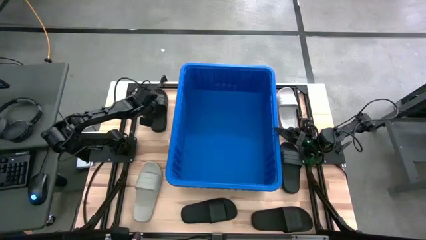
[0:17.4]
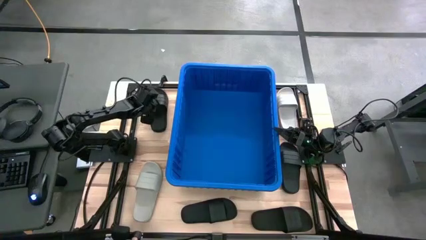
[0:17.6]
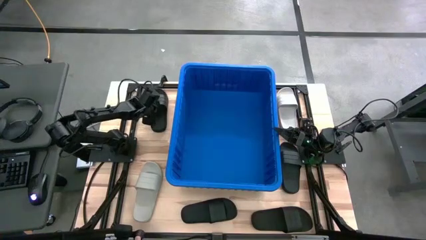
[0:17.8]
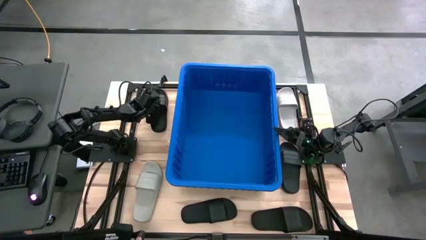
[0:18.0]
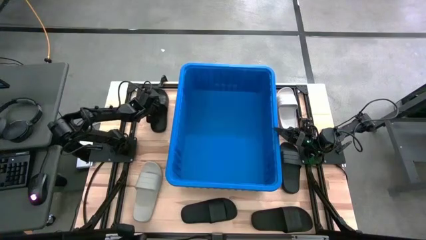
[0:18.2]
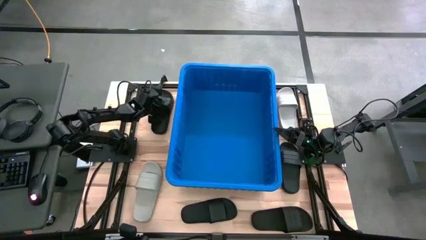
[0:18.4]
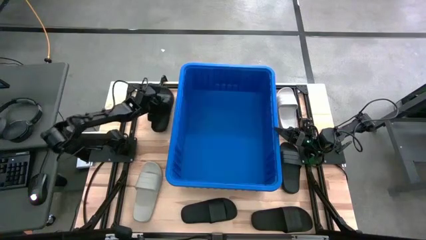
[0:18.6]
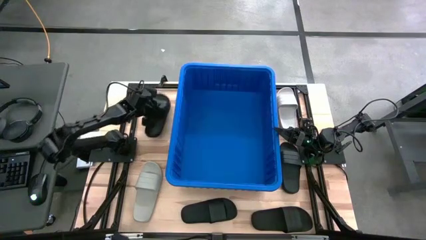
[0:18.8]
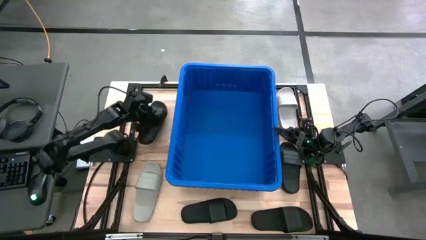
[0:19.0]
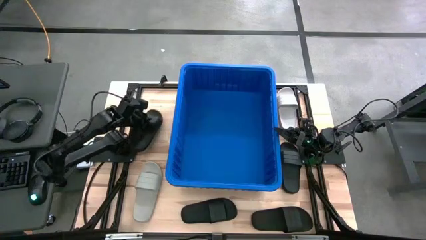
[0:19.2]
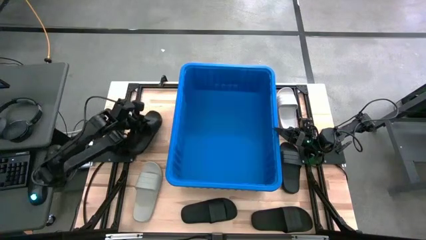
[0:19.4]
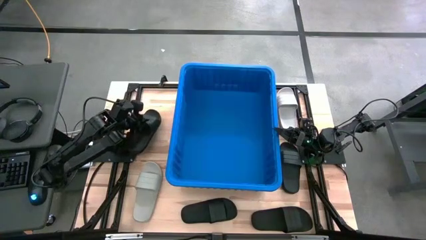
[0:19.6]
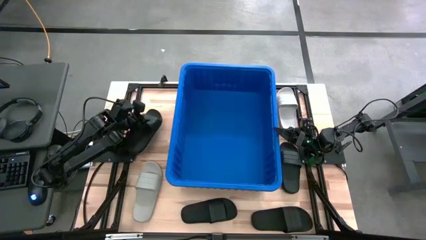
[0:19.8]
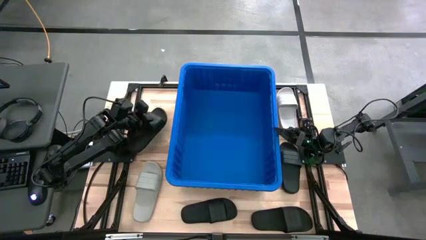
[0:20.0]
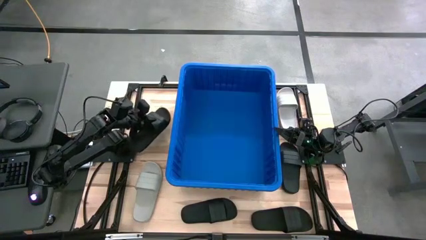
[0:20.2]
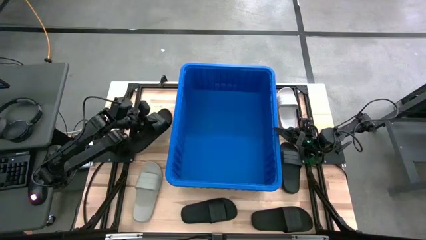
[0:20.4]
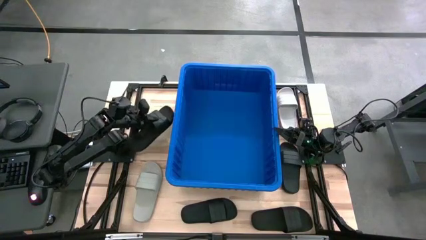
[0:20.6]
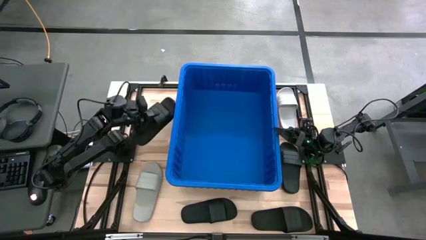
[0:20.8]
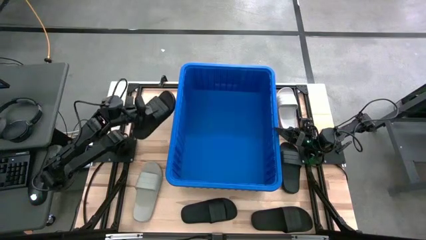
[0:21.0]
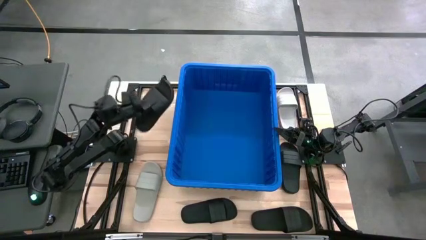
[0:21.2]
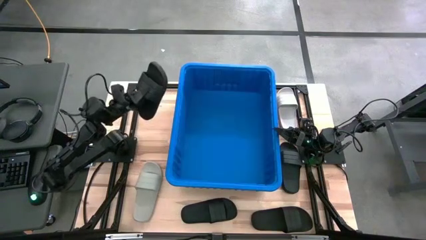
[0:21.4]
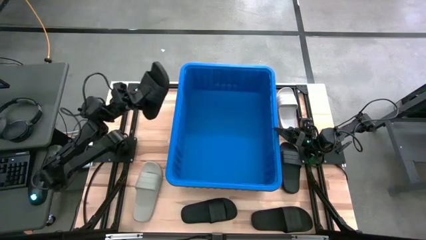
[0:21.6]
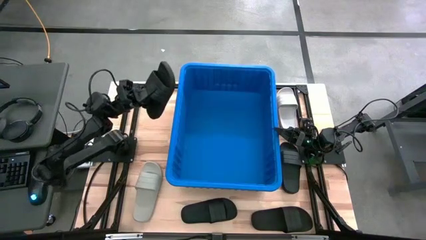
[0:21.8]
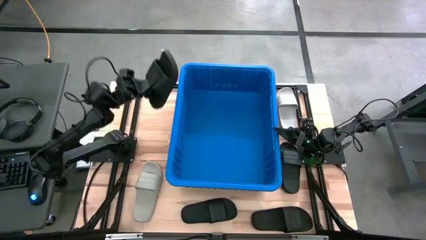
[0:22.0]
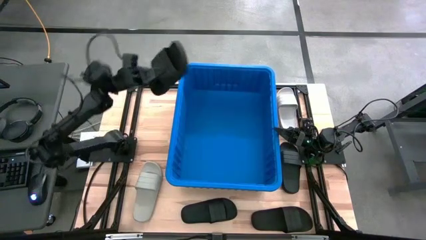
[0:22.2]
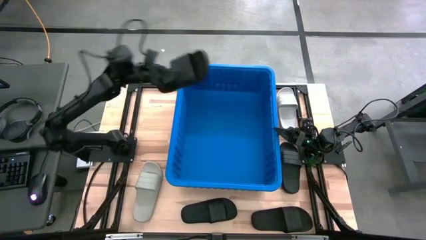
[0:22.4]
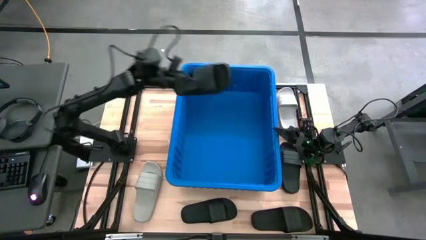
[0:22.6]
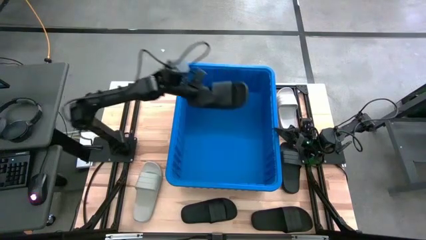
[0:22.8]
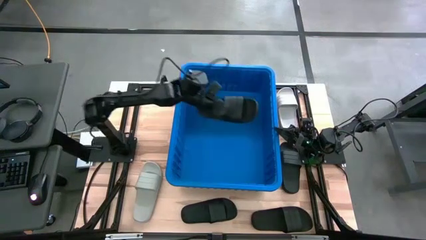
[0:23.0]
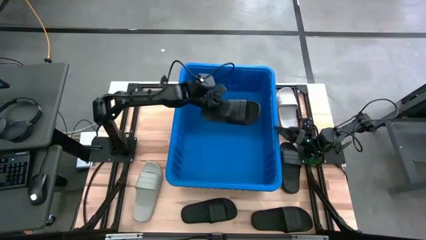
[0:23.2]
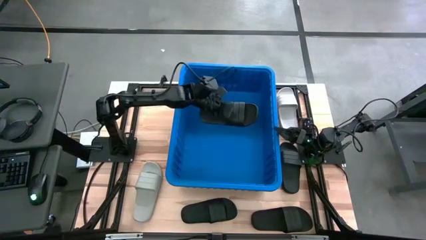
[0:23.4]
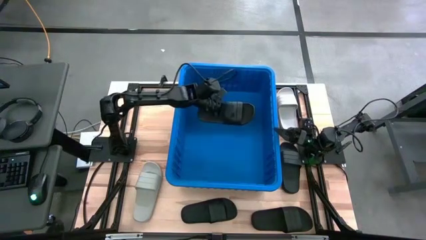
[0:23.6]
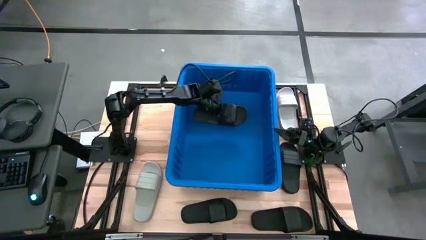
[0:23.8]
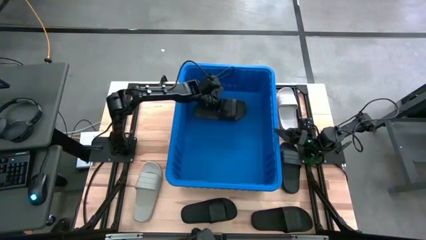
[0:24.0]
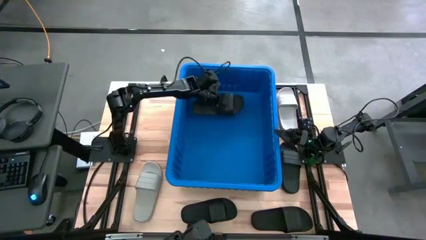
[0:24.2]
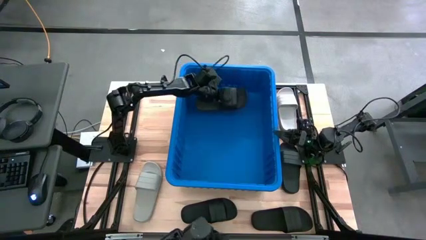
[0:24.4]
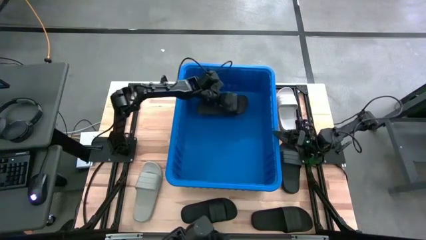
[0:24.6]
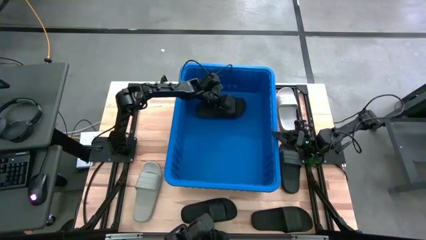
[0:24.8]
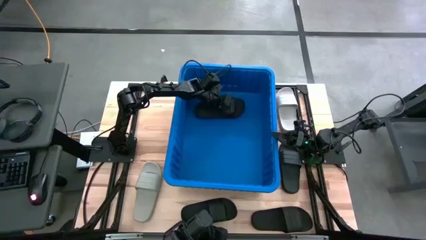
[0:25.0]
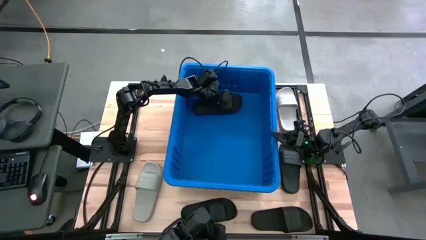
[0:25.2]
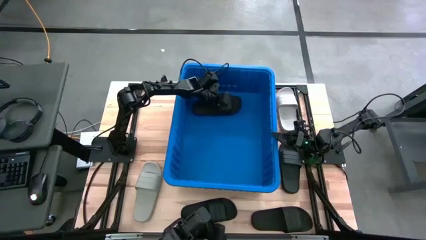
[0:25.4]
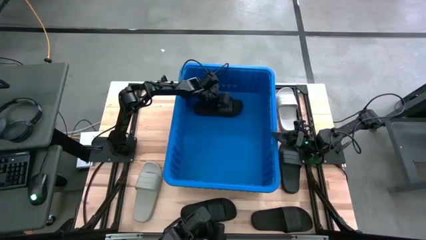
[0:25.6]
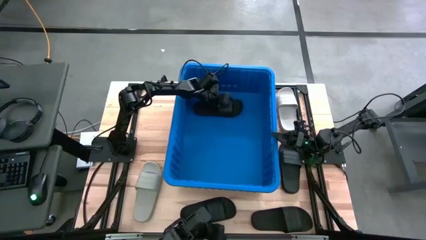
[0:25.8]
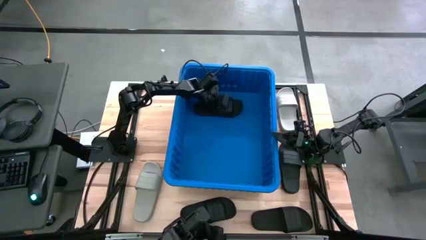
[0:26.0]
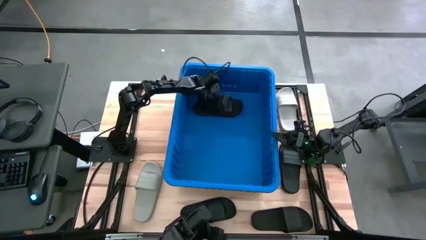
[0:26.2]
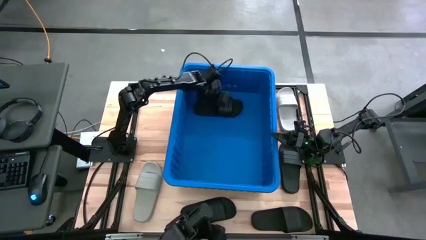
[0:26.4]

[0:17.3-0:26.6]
Task: Pick and place slides into bin
Put the black slide into the blue container

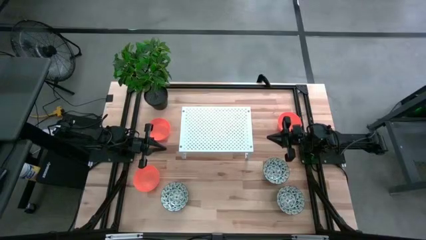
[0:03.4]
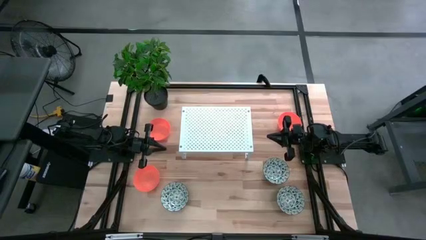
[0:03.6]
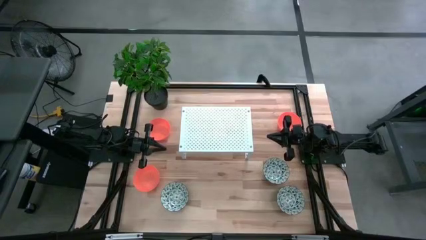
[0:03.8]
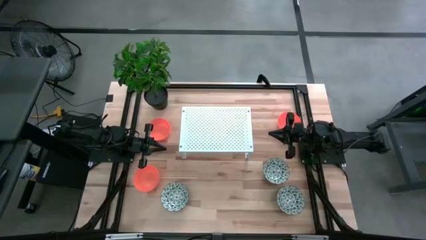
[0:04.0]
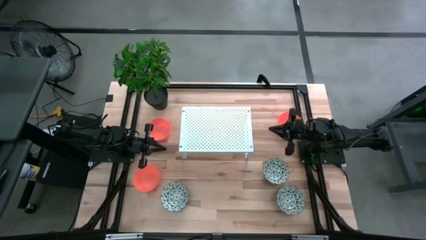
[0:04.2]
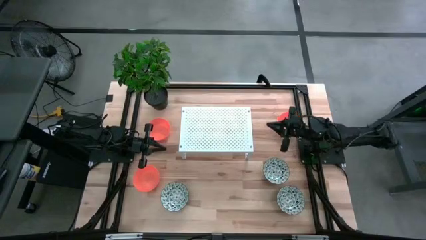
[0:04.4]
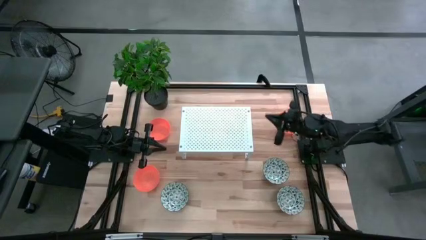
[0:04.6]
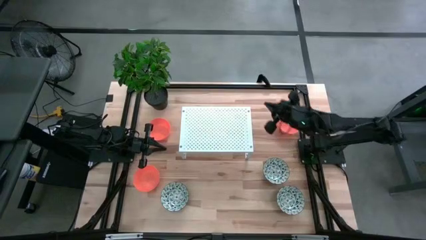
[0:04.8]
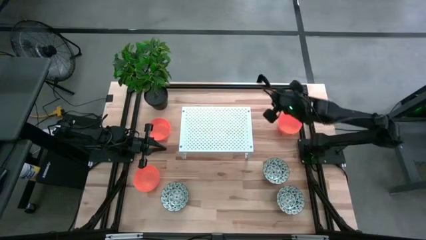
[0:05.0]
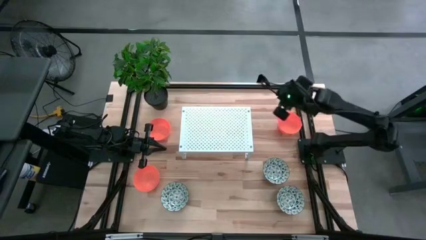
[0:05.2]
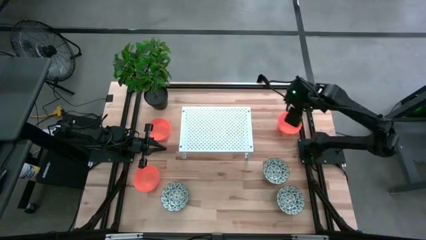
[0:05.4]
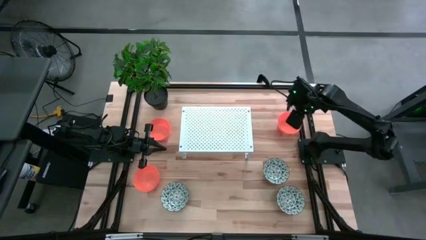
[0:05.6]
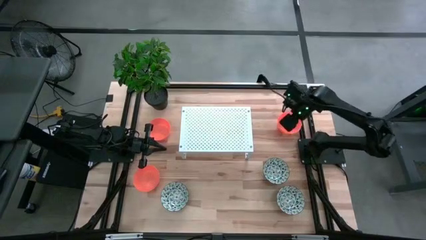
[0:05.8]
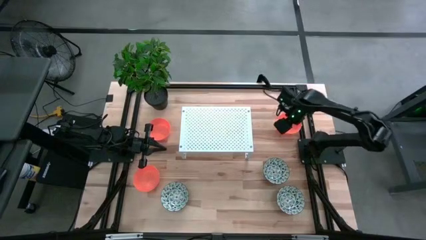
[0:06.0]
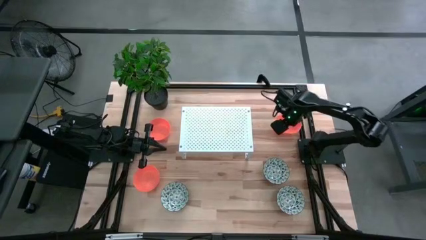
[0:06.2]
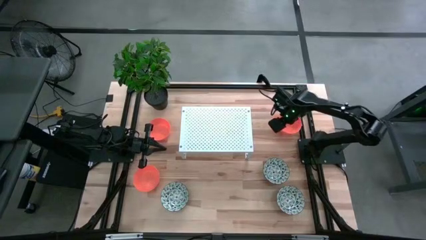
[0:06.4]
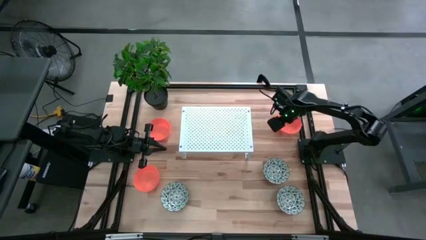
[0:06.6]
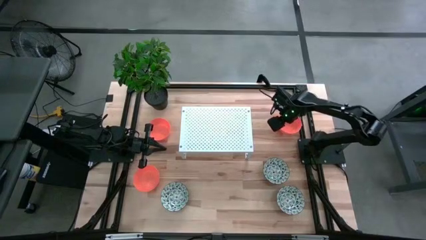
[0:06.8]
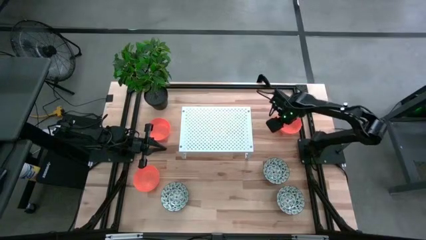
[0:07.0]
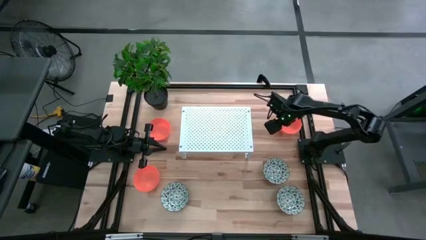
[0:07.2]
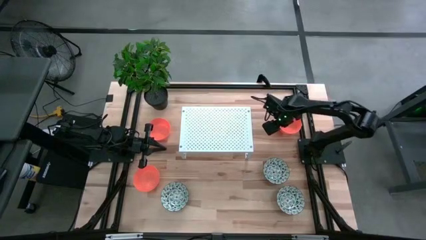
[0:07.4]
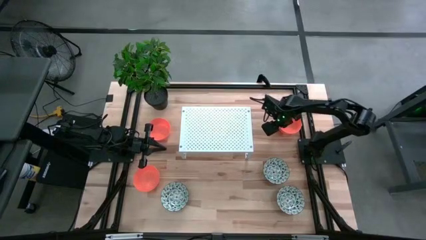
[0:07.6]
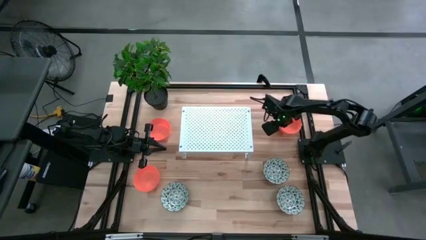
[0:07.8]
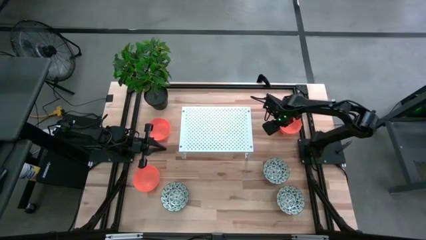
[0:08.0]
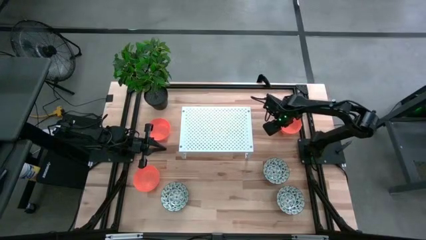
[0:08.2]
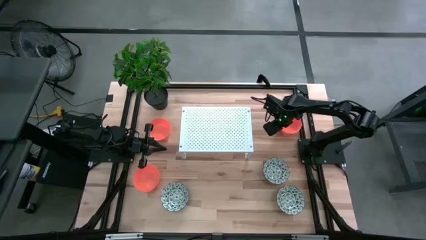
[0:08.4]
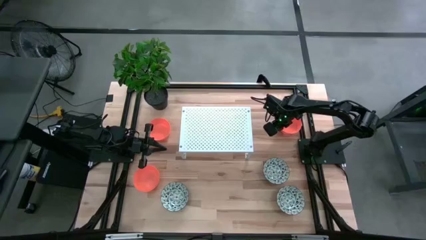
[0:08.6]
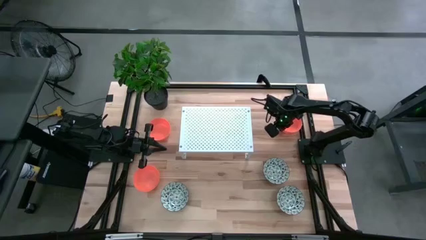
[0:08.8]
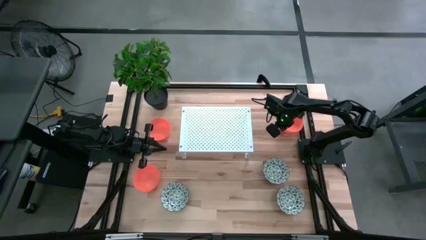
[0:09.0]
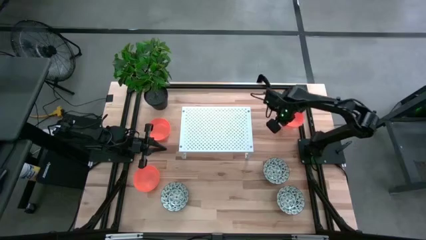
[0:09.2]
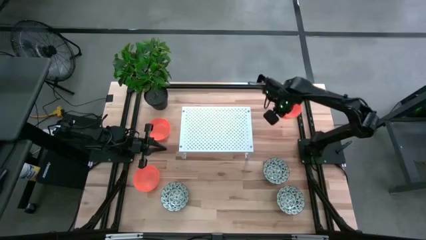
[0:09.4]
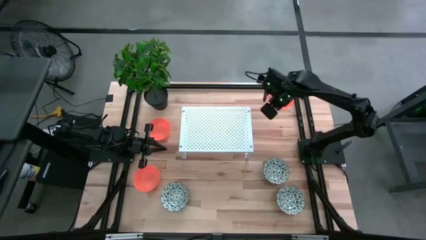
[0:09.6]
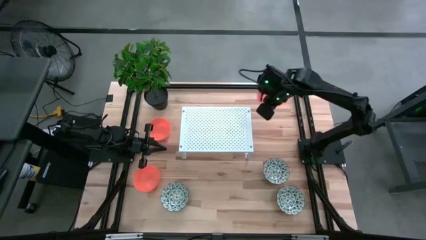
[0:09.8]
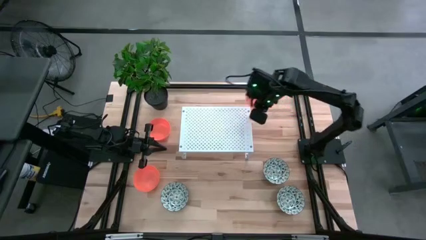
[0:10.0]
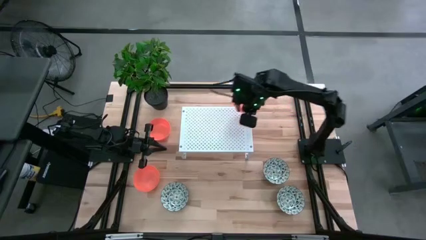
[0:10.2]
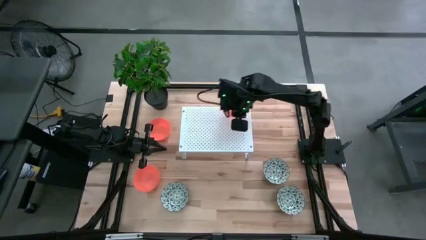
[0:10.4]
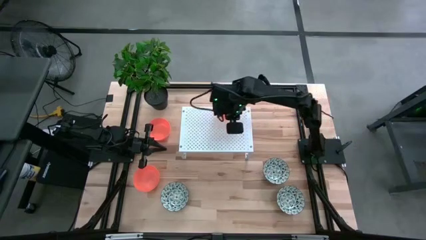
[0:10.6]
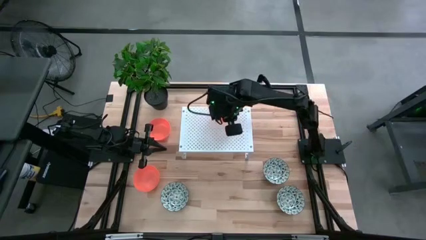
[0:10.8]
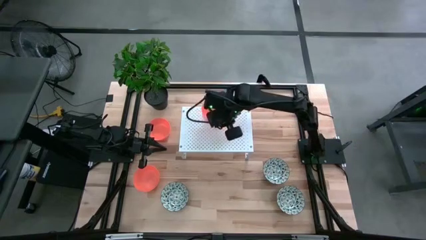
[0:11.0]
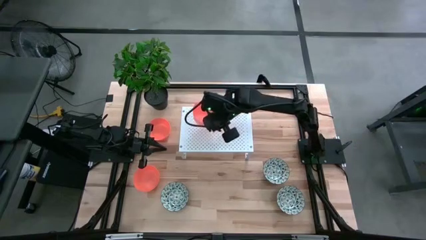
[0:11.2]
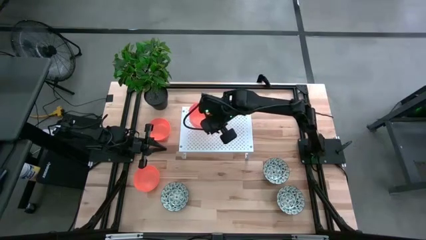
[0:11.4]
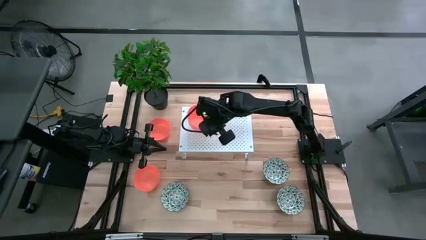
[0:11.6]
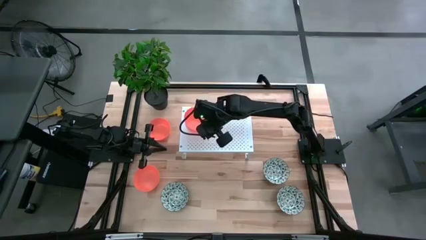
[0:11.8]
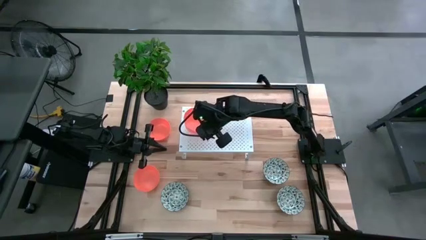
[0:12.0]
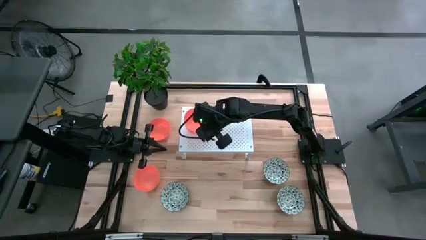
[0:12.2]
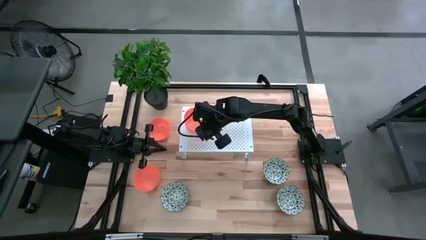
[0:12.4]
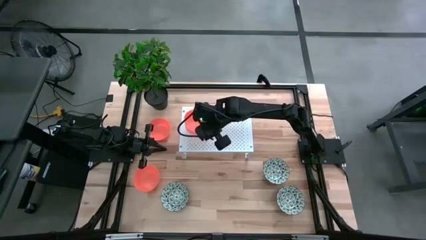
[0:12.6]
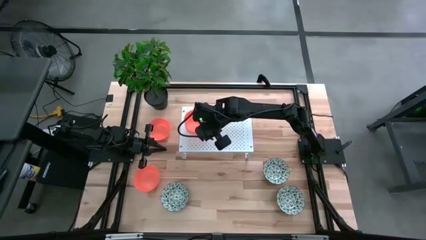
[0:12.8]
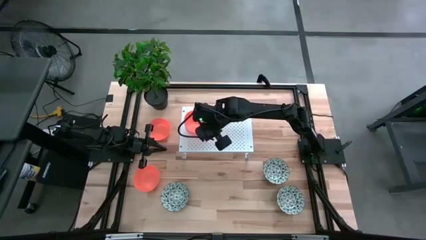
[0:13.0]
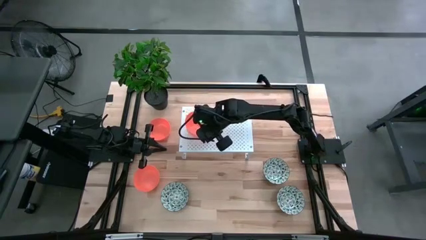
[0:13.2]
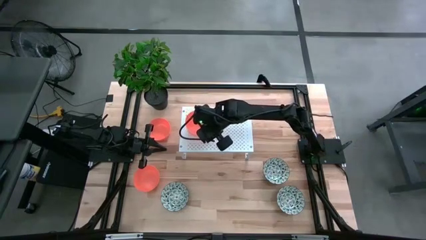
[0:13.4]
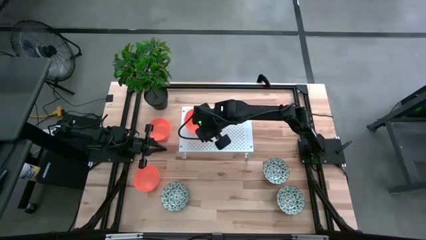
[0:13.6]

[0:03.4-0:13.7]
Task: Pick & Place Mini bowls
Put the top right orange bowl on the shelf
